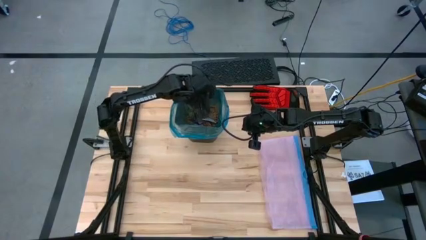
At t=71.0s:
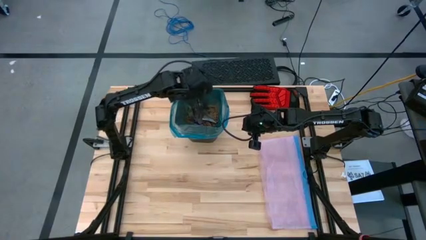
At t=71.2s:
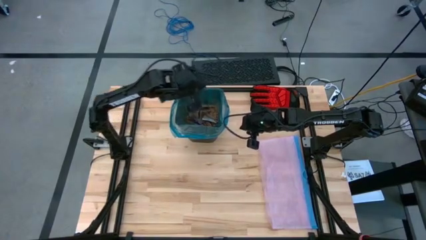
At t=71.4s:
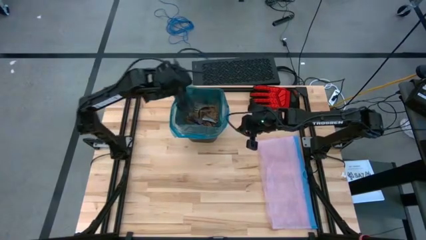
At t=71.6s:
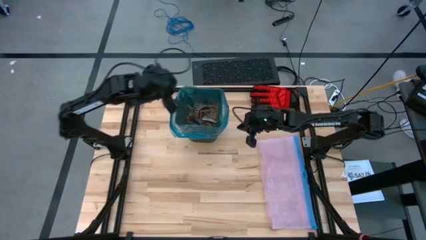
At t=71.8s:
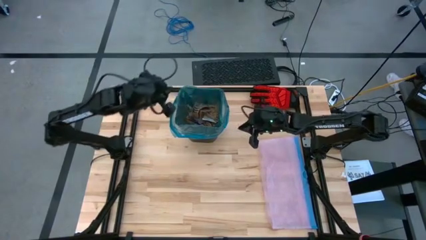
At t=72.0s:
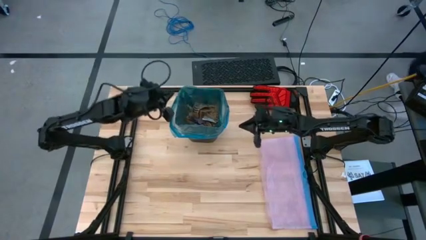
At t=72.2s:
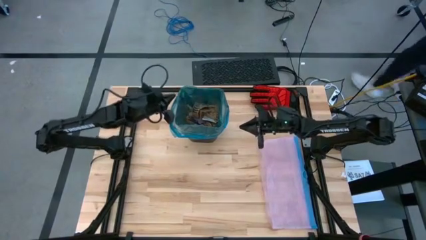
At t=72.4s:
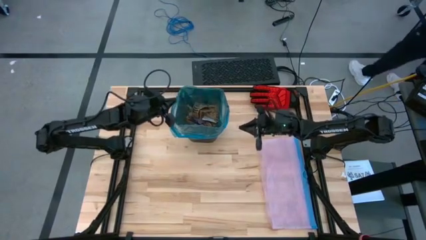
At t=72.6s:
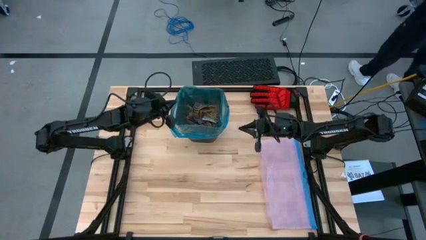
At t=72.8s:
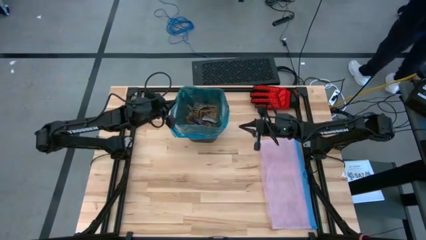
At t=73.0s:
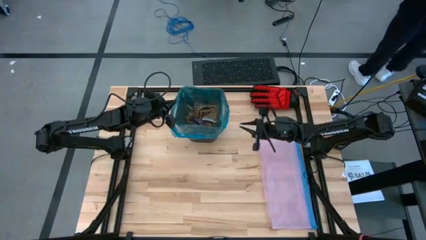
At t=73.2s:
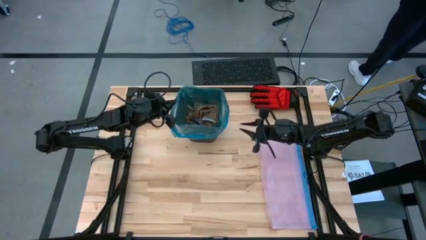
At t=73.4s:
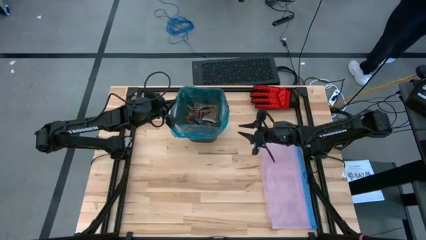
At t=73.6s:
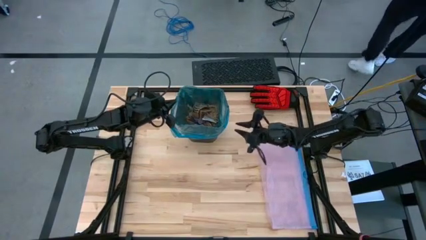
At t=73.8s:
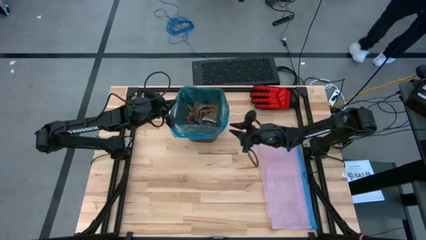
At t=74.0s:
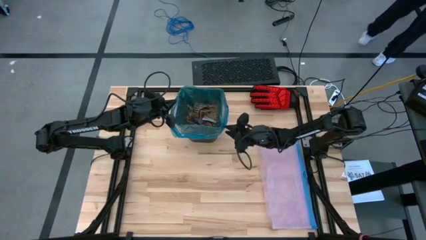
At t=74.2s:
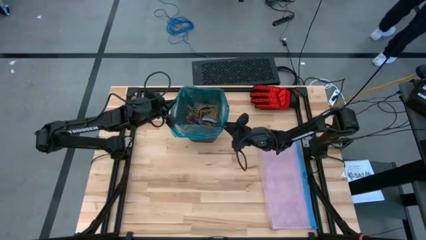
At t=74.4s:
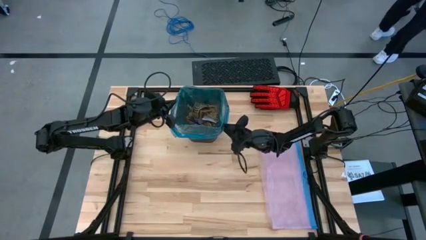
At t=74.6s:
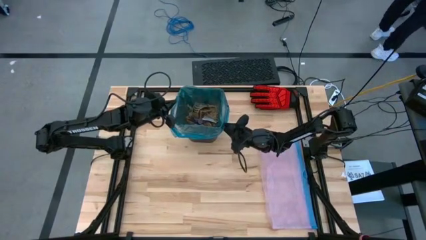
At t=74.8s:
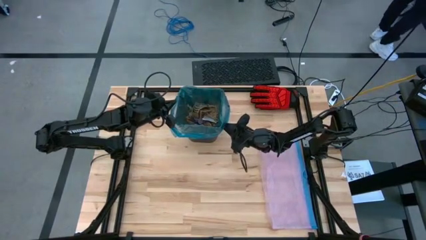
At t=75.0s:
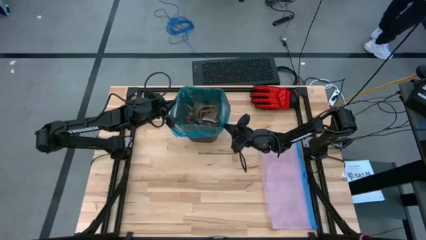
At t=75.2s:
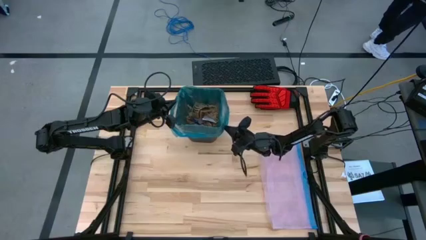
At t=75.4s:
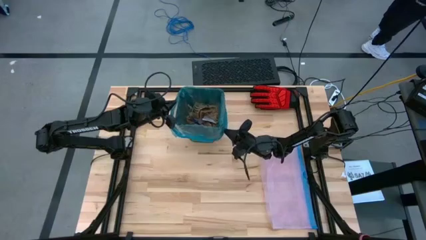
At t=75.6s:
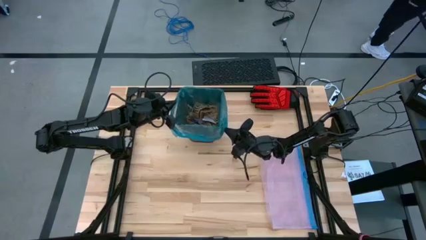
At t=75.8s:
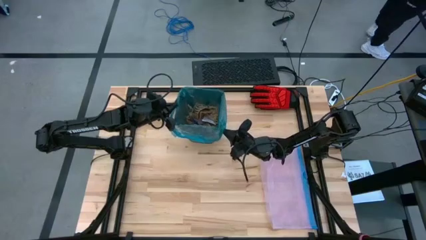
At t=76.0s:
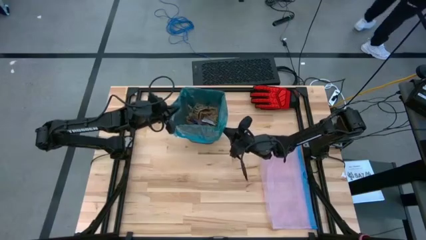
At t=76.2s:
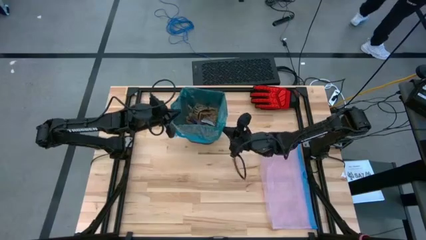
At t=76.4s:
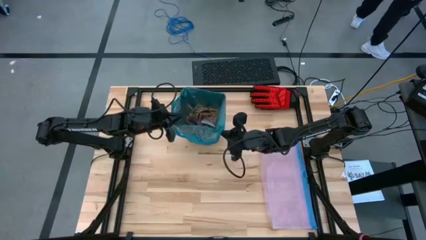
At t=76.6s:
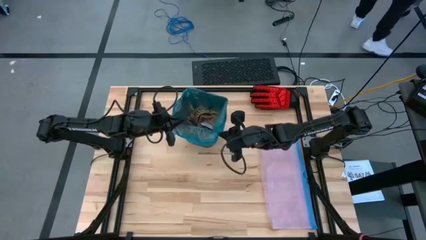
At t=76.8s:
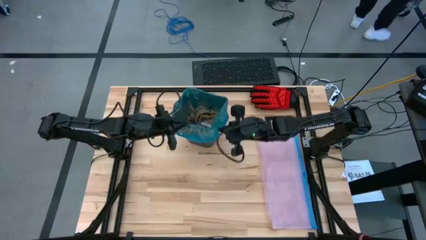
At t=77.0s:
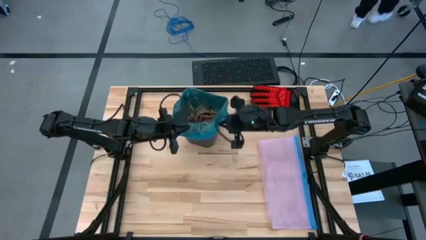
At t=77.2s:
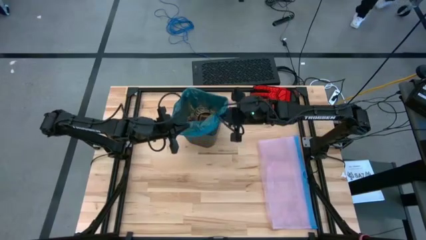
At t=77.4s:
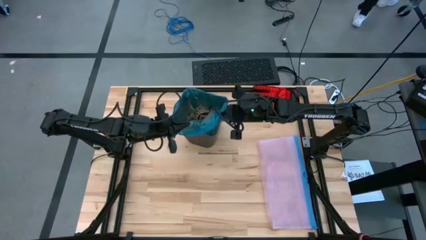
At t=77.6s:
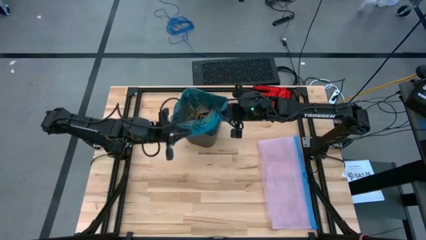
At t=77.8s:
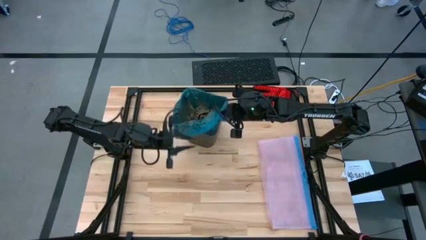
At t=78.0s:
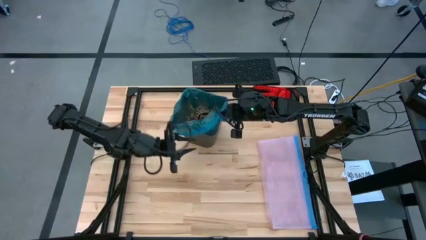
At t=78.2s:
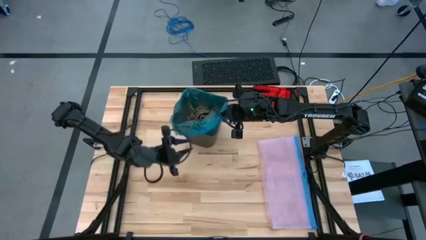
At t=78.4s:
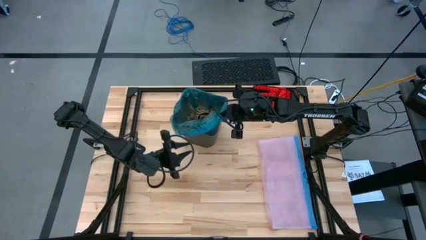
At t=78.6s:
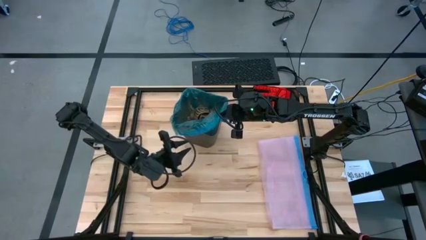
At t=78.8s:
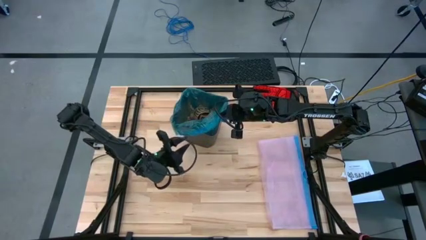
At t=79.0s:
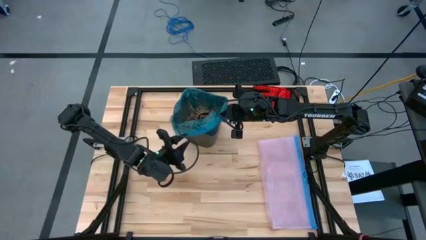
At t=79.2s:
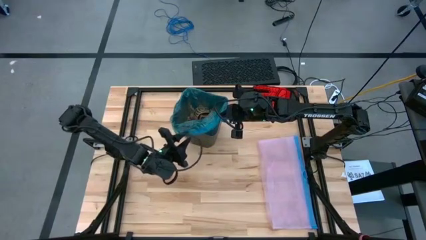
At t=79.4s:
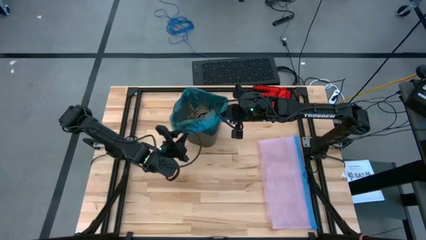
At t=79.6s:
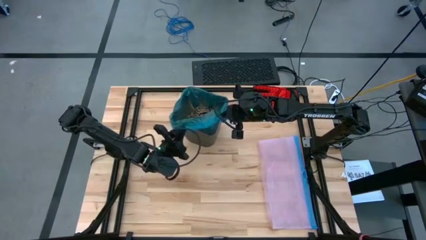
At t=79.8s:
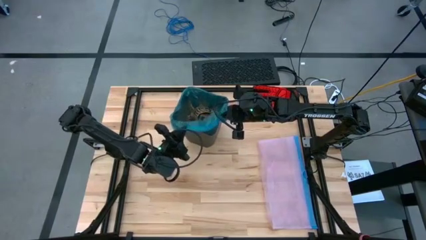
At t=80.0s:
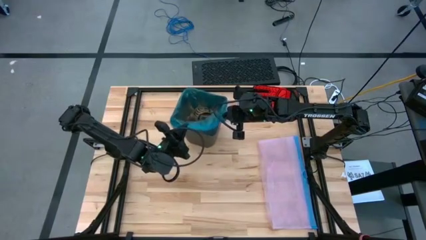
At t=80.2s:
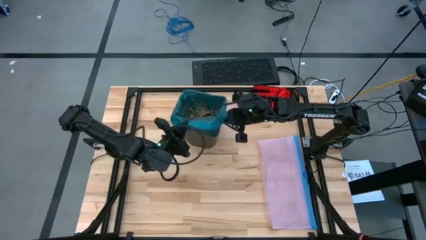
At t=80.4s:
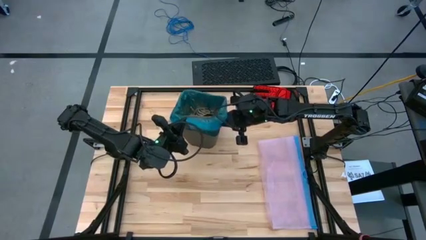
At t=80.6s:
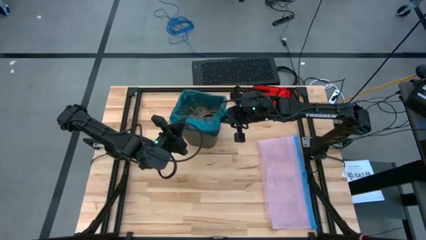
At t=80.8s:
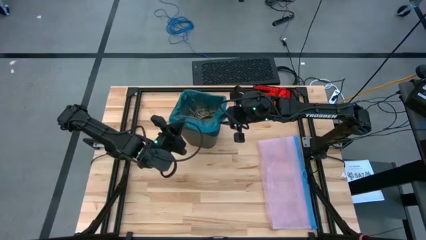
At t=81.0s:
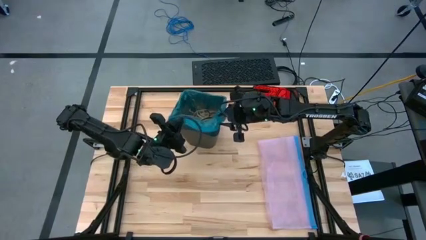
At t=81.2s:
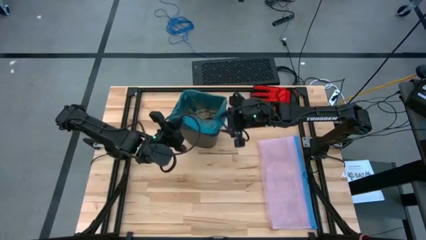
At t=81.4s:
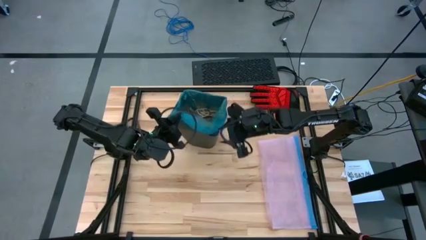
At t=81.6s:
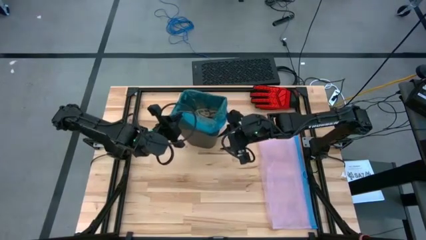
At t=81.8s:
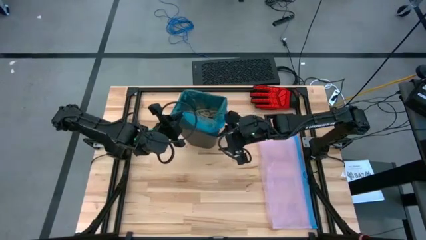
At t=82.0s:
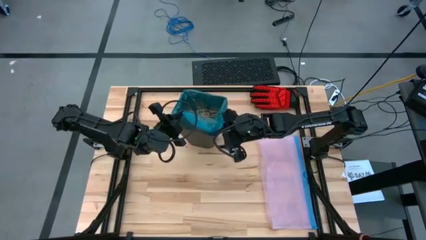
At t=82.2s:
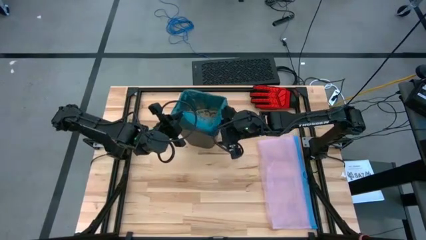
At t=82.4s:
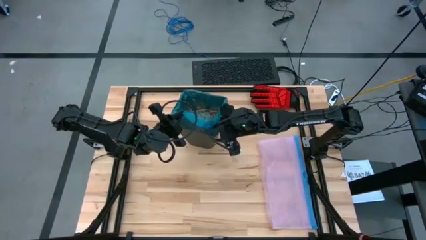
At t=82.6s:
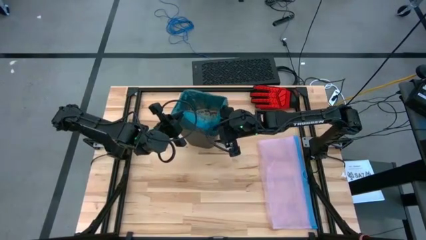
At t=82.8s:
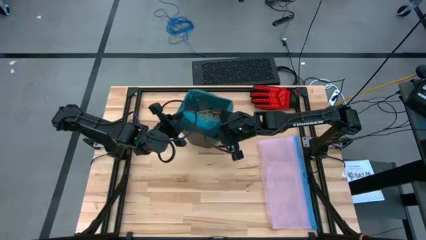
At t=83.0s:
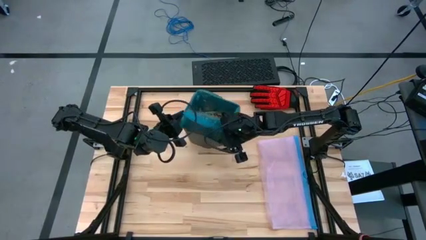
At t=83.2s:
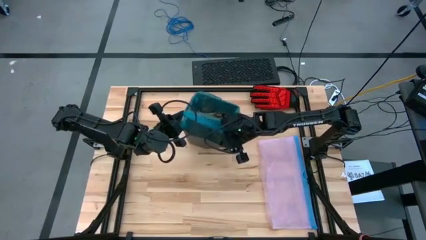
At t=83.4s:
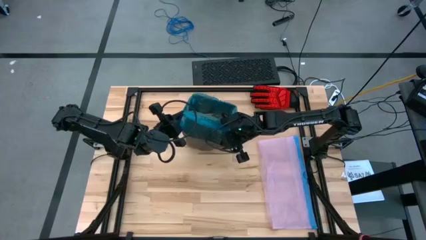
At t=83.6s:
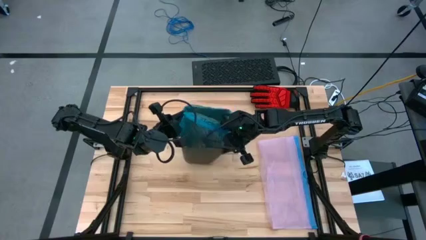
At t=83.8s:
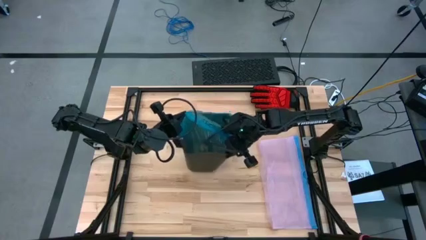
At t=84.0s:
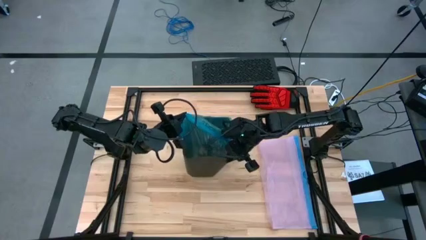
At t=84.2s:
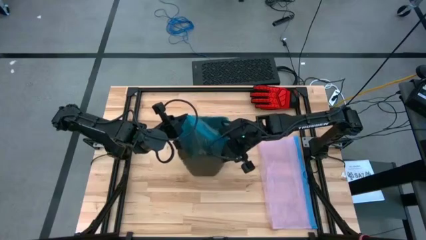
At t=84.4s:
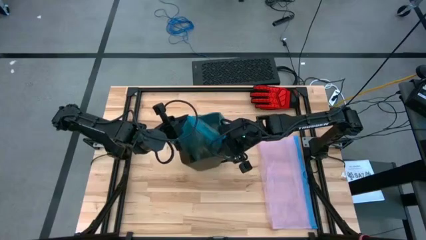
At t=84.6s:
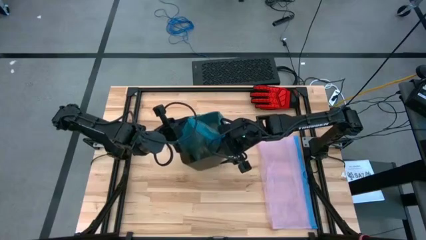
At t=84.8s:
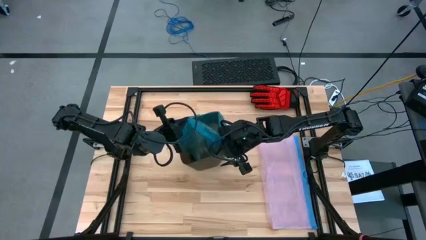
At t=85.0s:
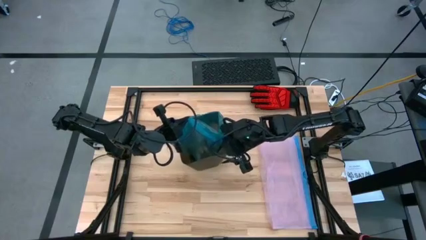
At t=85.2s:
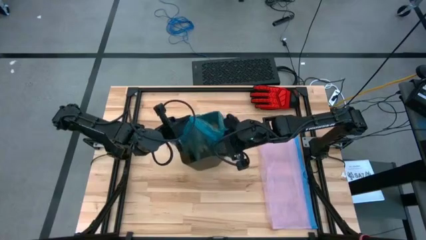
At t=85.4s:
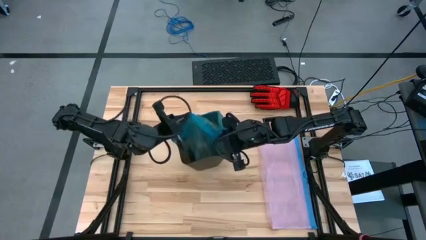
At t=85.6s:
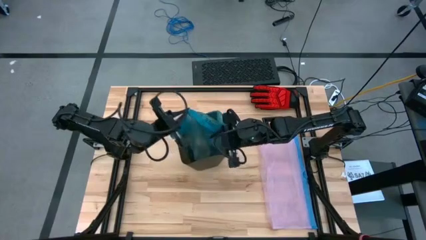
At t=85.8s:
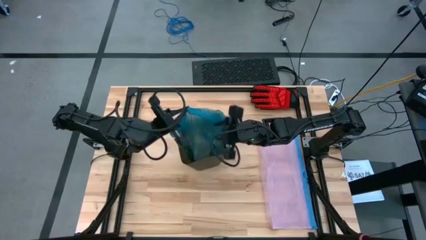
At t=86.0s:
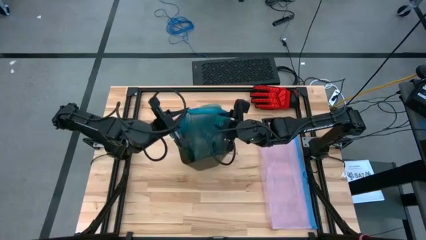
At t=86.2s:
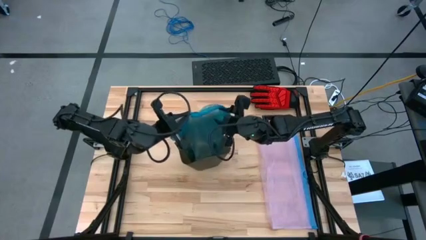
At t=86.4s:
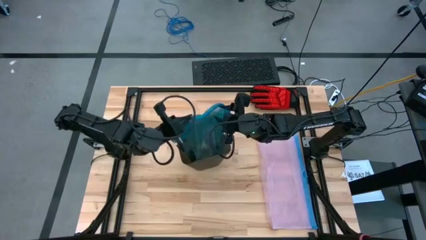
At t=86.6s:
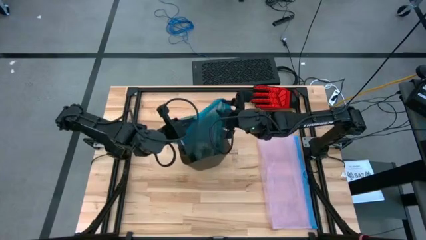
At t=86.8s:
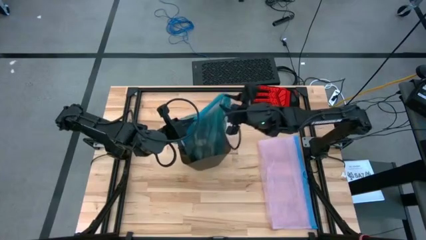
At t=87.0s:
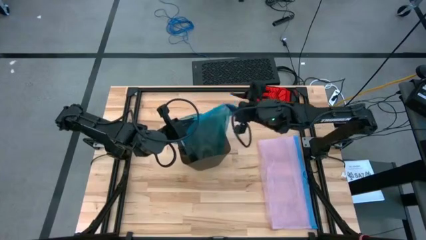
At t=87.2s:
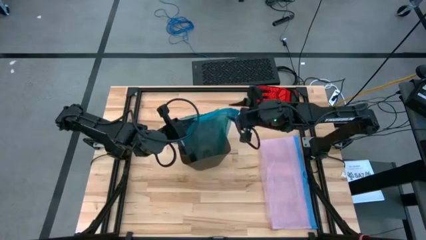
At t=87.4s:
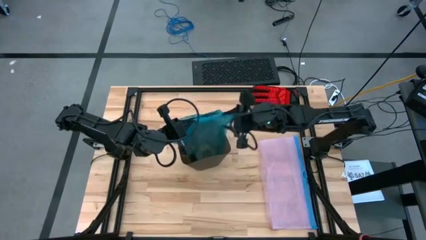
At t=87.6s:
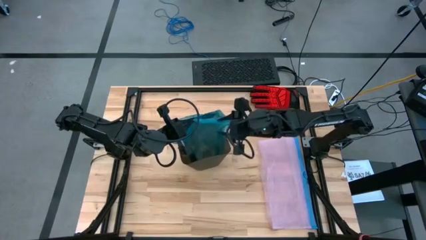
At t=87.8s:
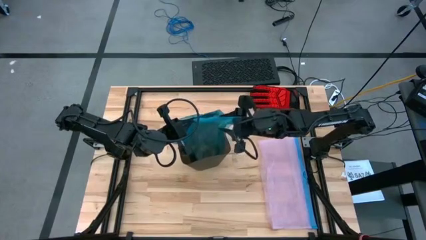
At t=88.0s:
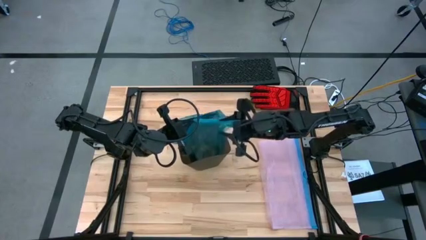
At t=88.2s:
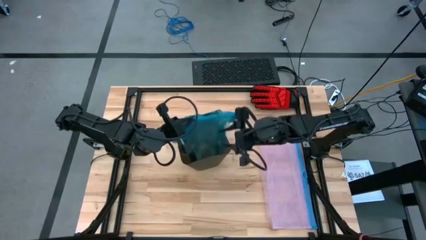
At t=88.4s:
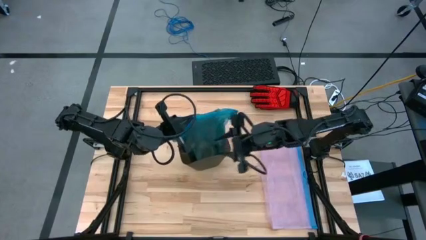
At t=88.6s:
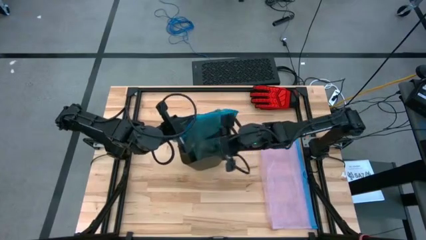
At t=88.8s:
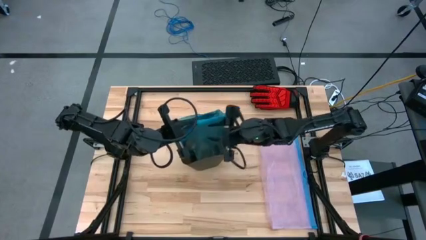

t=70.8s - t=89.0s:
Task: place trash/remove bag and relplace
Remove the blue trash bag from the black trash bin
